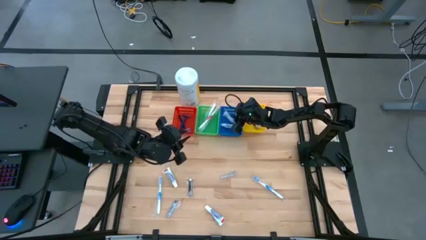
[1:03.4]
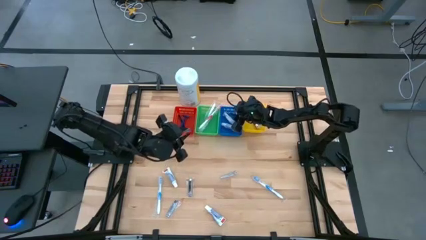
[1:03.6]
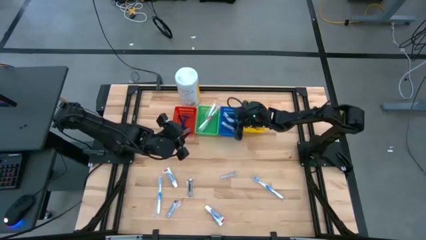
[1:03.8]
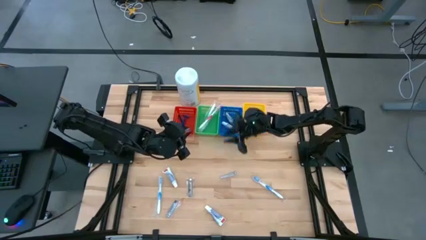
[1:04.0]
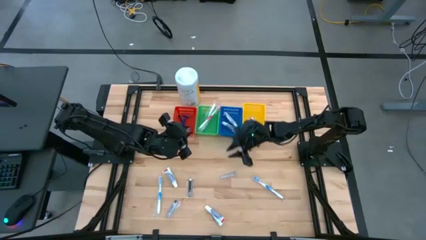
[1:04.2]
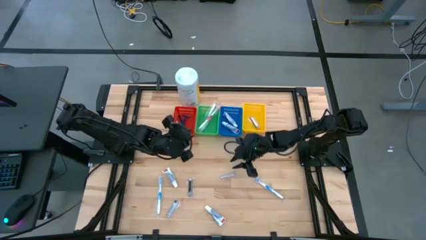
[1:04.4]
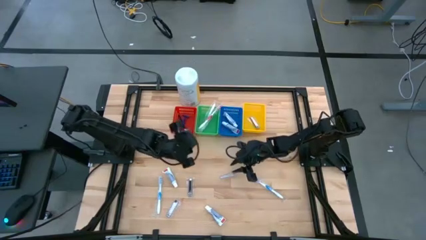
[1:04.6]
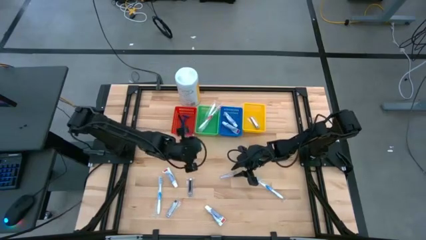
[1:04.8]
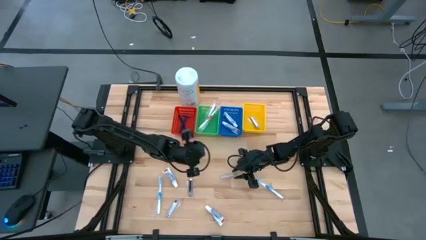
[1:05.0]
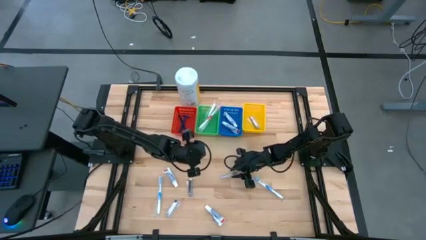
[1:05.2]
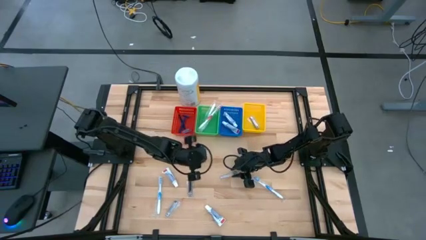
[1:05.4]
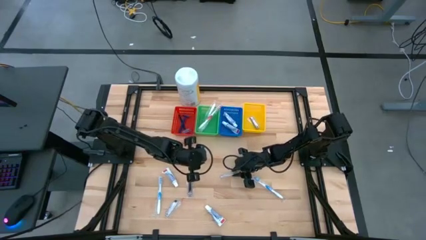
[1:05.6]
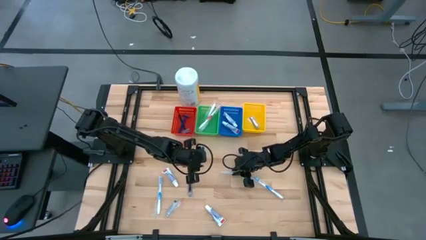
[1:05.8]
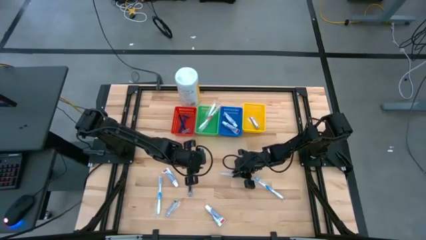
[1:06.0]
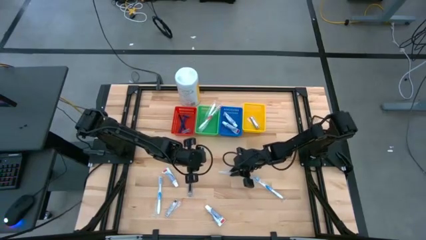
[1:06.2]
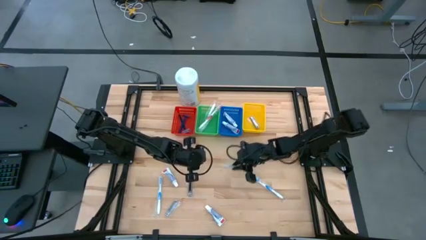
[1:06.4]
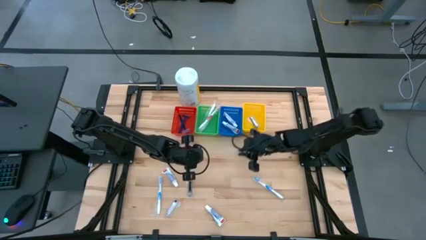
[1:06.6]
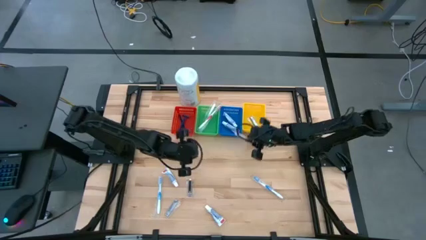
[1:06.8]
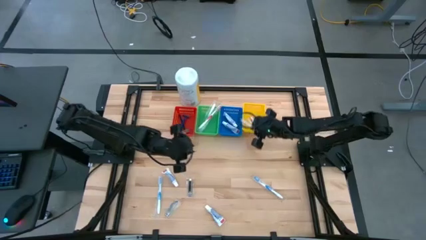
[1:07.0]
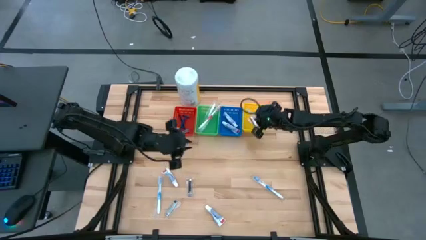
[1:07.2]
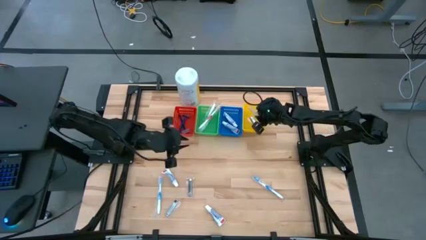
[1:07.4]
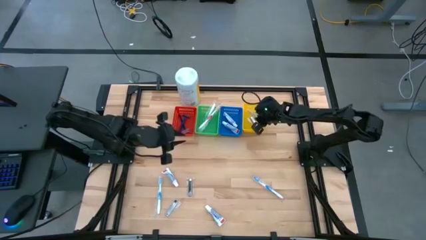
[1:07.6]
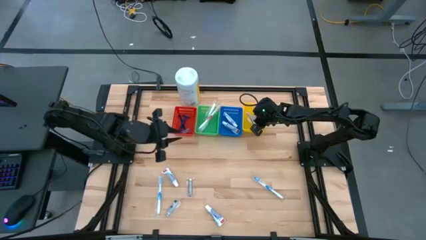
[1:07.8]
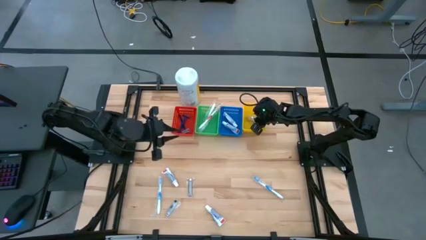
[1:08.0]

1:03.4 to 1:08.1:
Task: Pick & Place Travel size toiletries
Put the silver nail cutter into the yellow bin

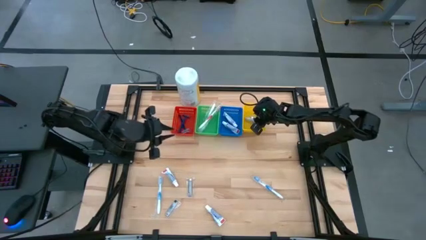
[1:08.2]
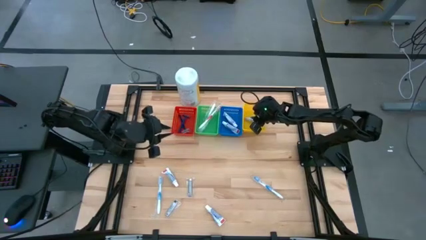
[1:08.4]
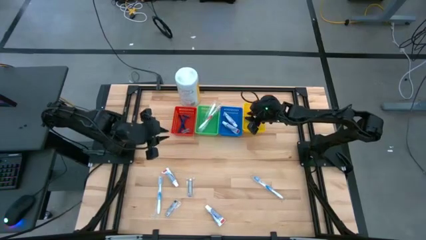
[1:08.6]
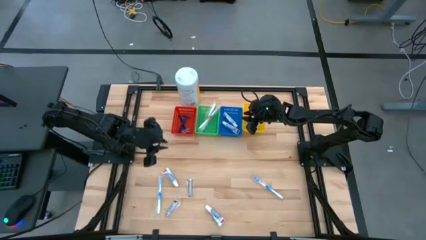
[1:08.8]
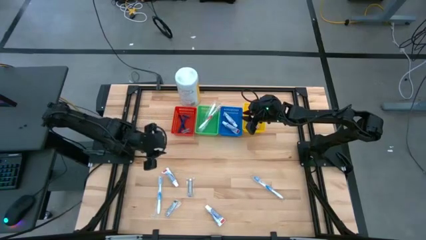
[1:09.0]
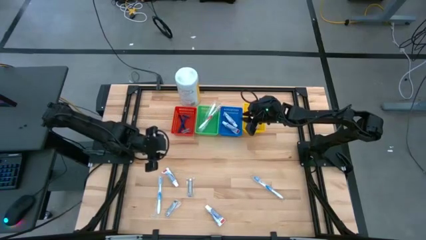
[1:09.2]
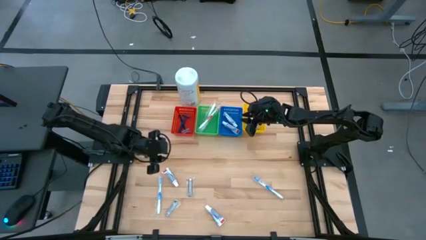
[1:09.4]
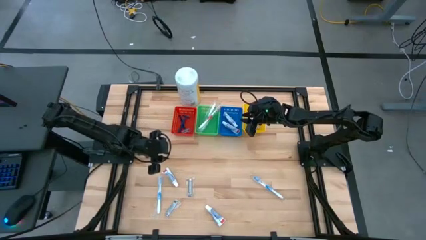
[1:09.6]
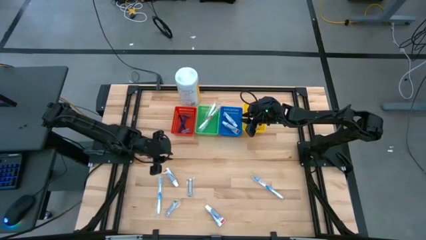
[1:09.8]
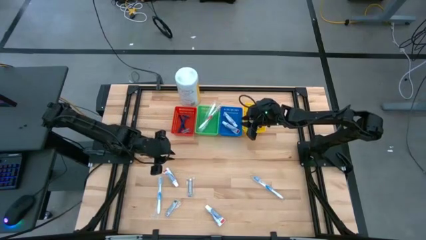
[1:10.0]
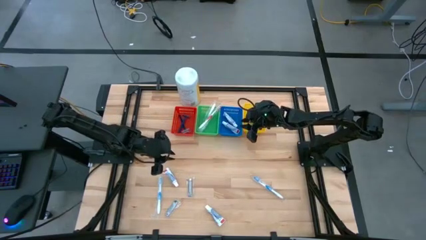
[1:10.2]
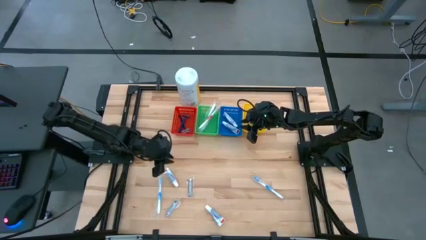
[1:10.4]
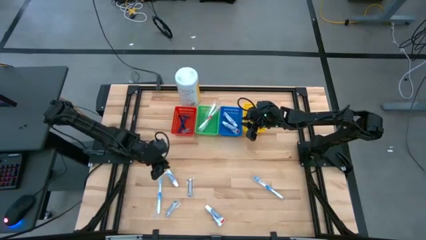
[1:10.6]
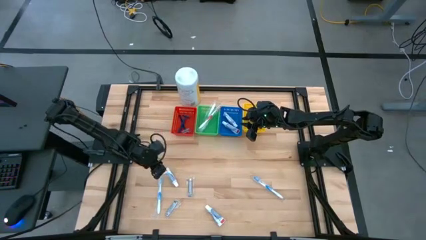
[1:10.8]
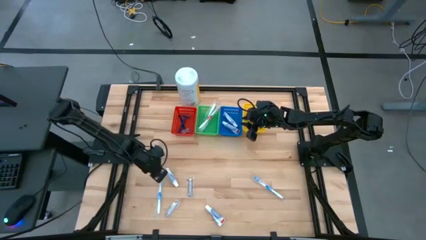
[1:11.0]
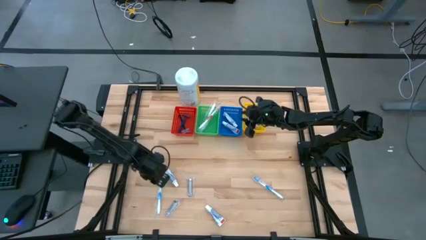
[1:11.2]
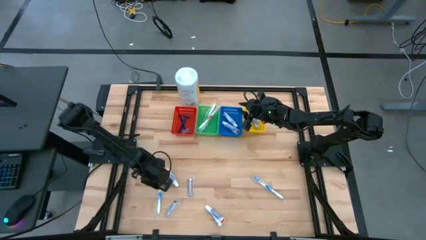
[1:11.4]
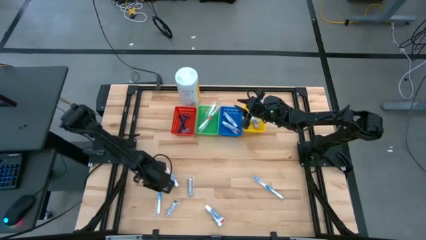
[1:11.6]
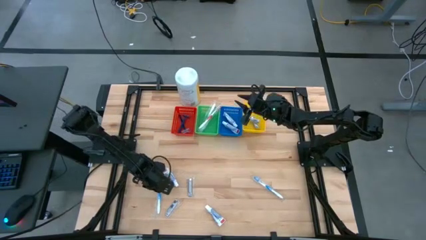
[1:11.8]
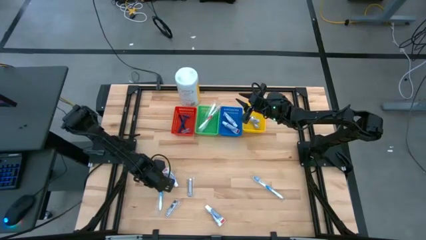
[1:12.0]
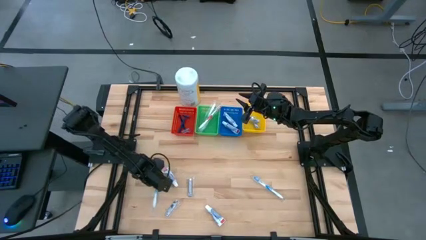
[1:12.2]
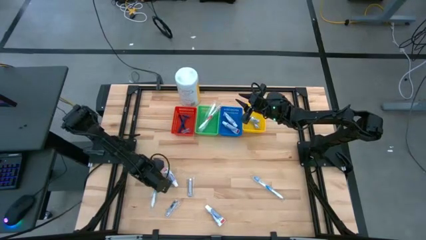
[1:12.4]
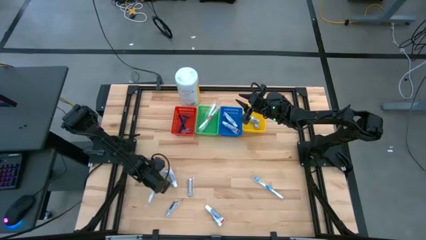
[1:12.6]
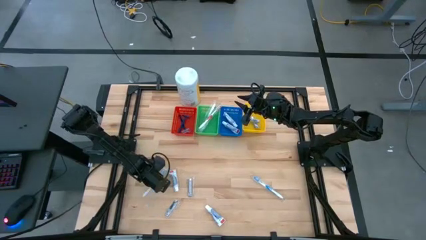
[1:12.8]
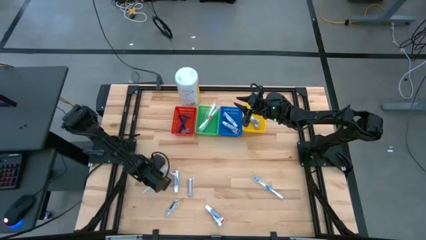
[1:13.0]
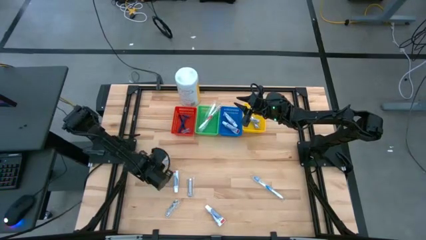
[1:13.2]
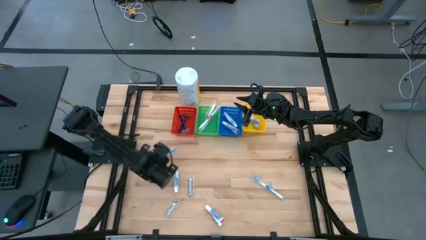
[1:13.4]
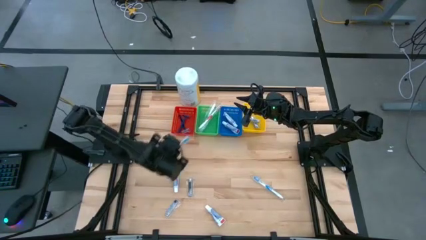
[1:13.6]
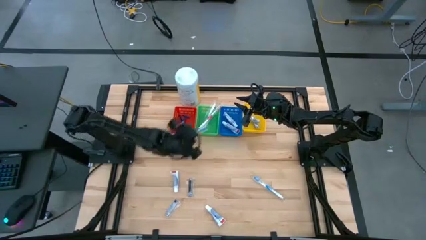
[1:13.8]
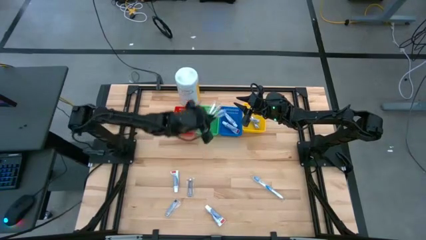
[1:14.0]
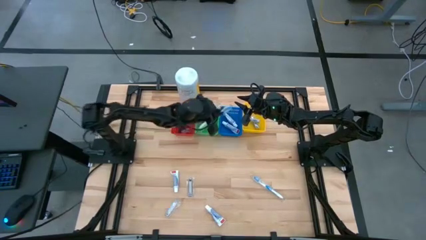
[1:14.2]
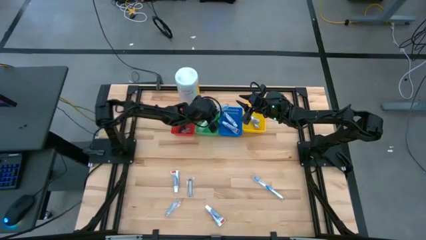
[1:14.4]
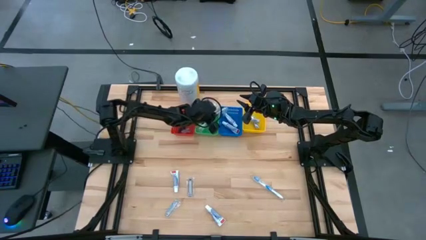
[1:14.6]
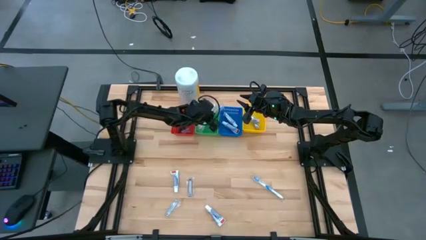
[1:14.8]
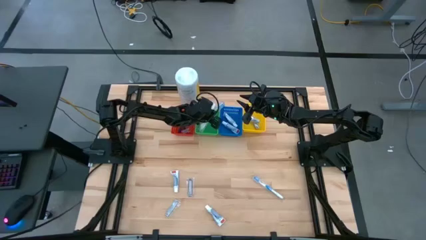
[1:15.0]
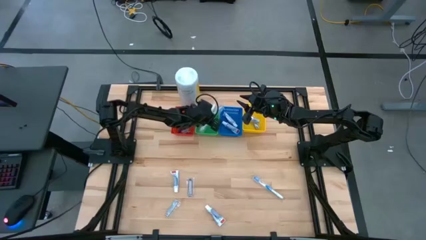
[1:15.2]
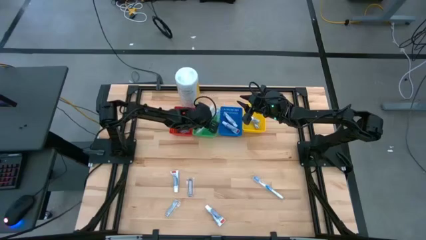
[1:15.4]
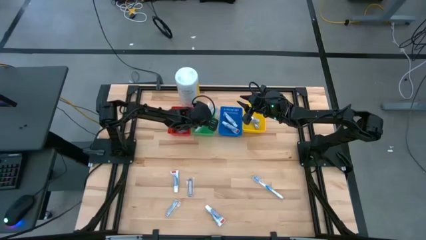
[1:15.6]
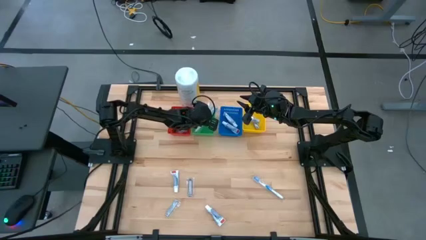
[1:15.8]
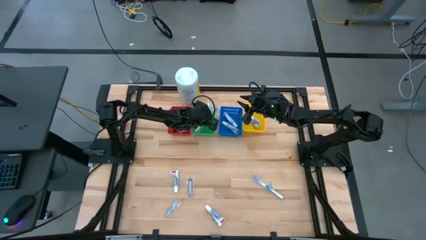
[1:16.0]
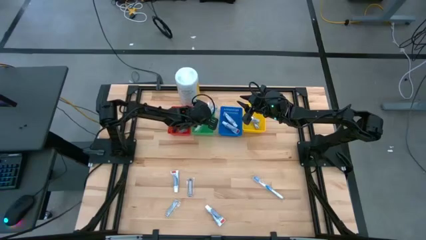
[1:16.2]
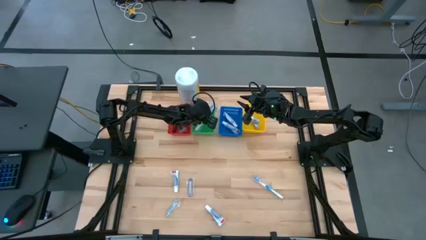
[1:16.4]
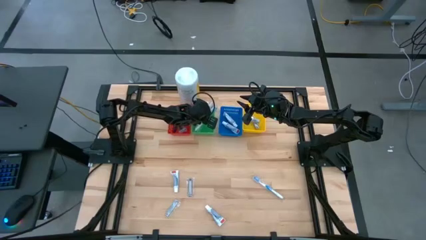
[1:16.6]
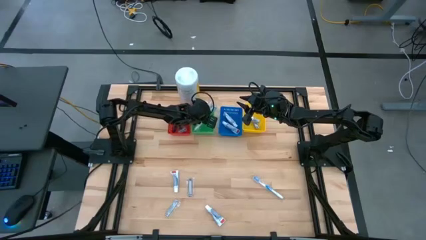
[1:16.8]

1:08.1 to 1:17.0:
Put the blue toothbrush into the green bin

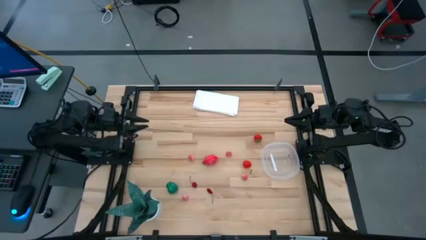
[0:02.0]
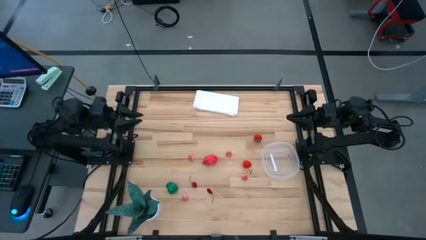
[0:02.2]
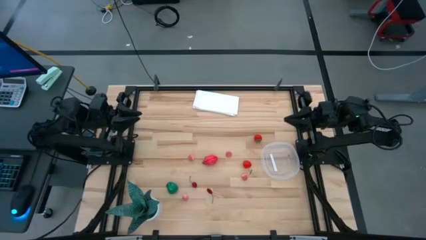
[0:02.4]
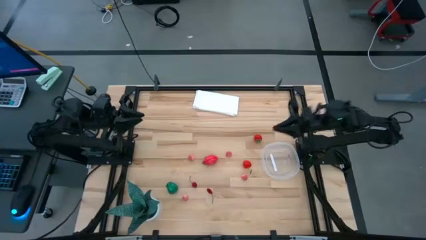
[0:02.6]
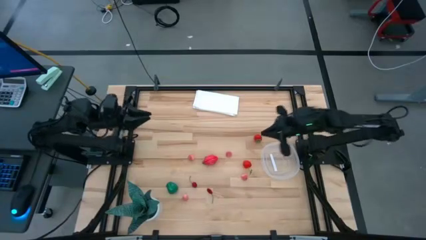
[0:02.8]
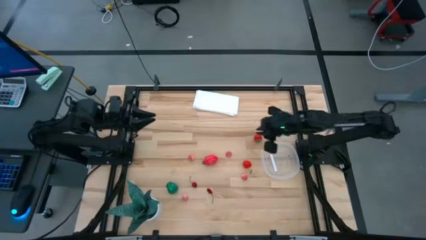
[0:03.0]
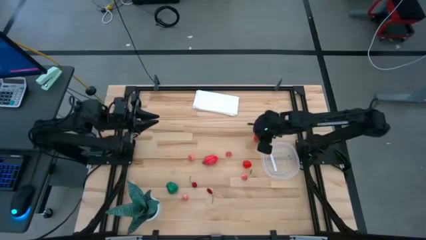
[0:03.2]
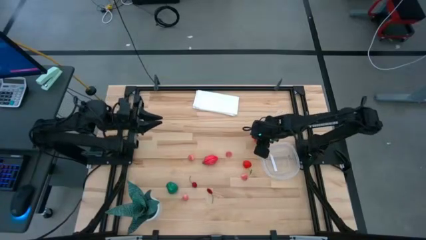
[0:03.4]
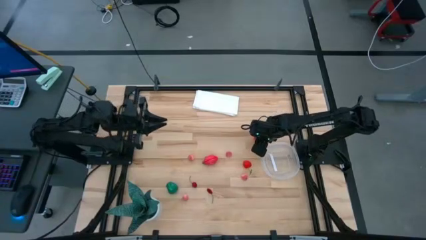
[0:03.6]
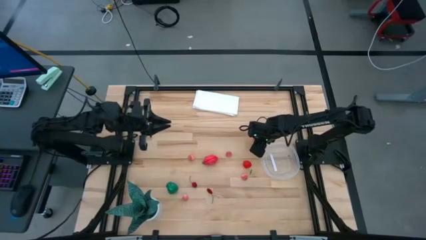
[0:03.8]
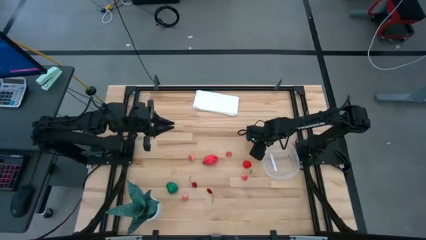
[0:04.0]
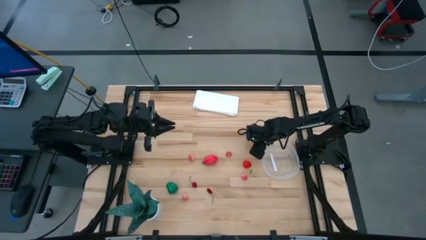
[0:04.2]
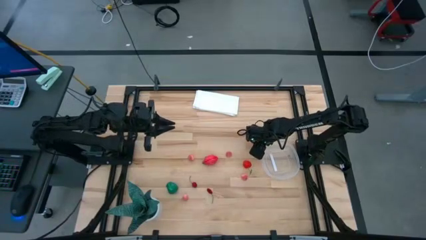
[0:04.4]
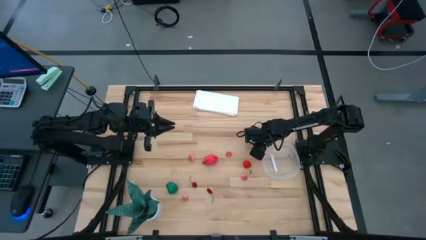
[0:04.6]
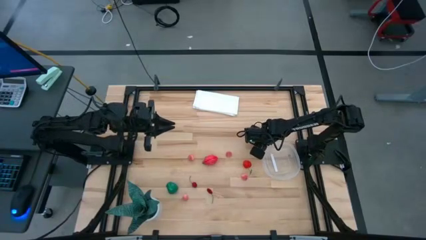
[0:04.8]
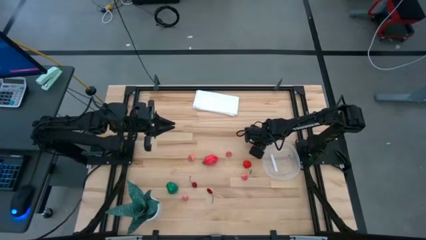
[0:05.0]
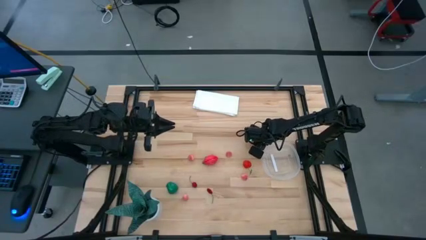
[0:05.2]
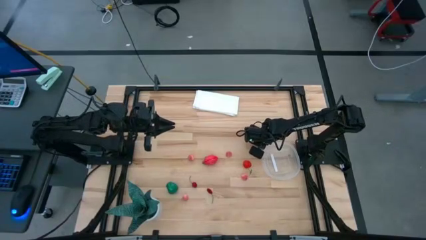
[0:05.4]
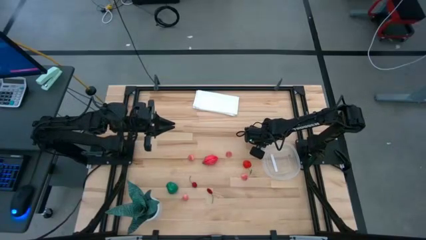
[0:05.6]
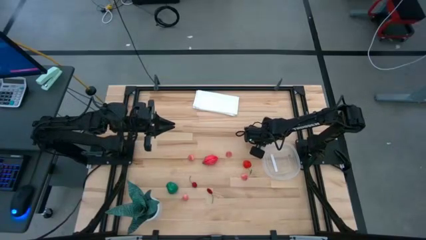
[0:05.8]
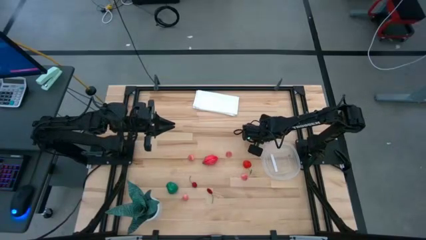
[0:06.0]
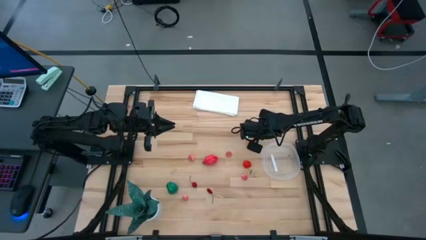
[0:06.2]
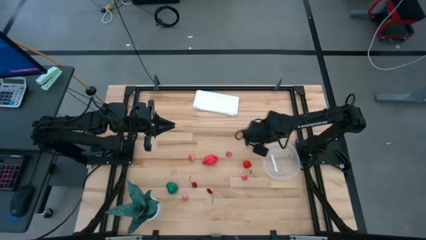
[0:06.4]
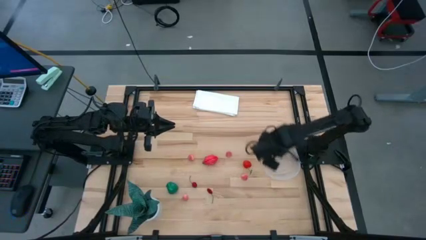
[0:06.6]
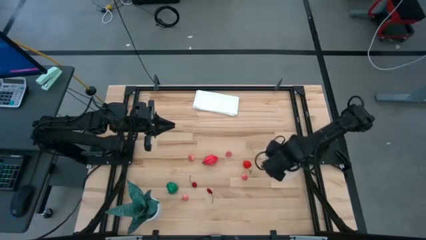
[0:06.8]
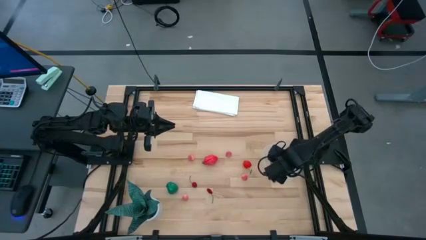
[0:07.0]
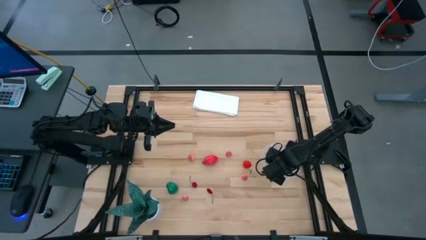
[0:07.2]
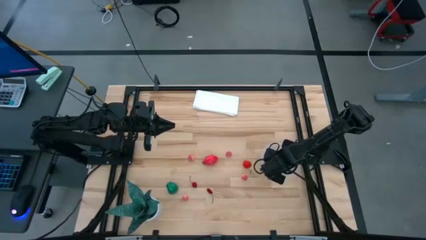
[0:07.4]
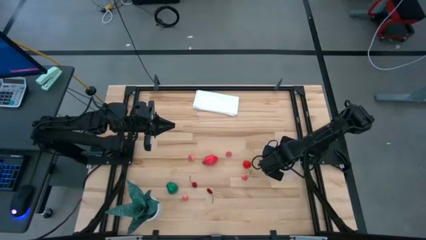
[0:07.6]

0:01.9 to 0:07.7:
Task: Pick and placing Produce into tupperware
Put the red strawberry into the transparent bin
